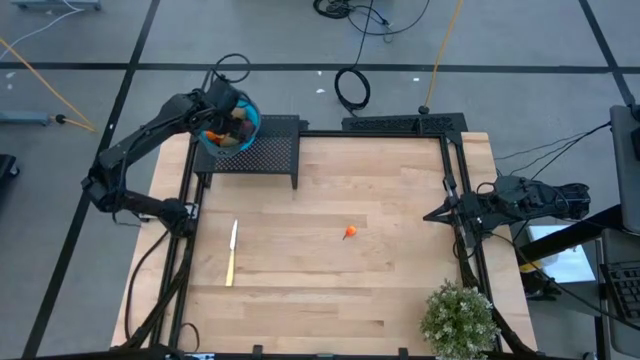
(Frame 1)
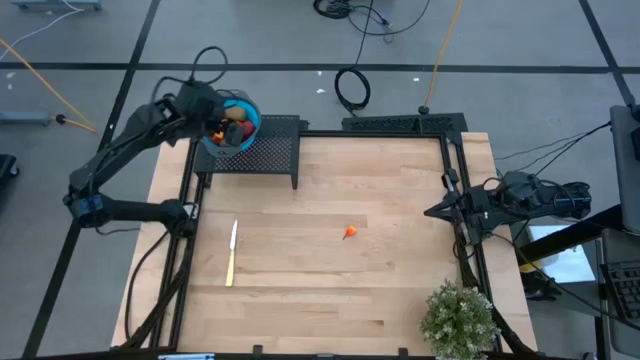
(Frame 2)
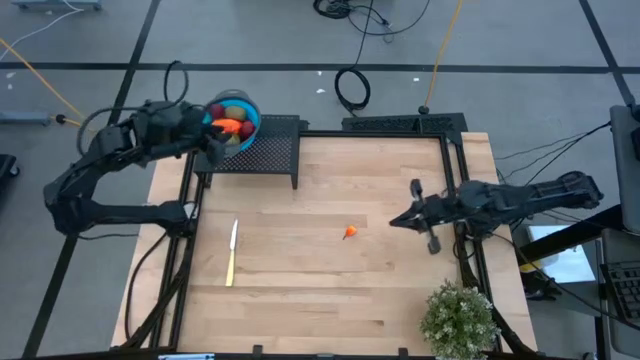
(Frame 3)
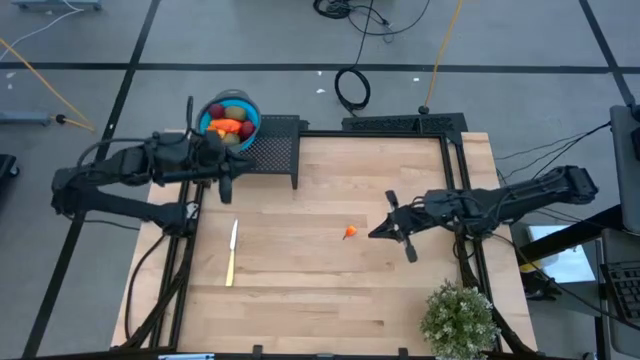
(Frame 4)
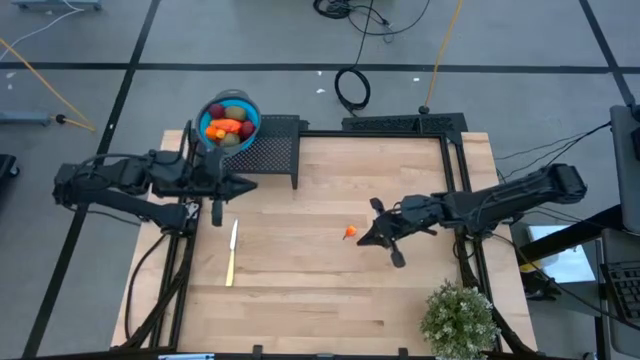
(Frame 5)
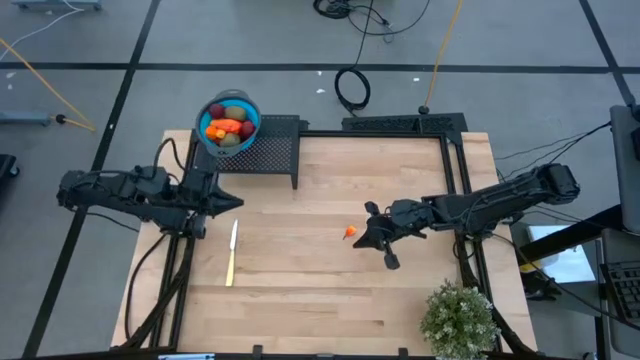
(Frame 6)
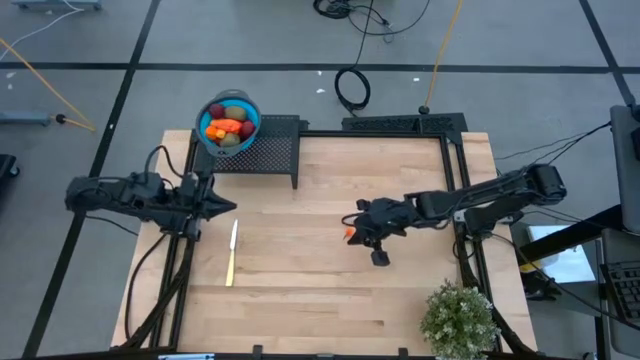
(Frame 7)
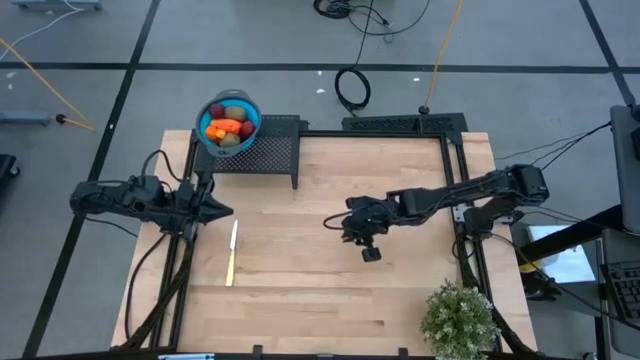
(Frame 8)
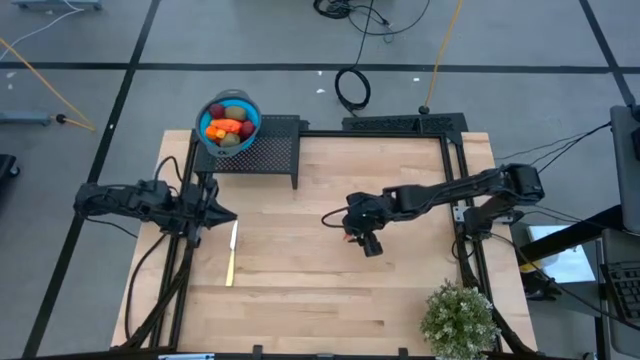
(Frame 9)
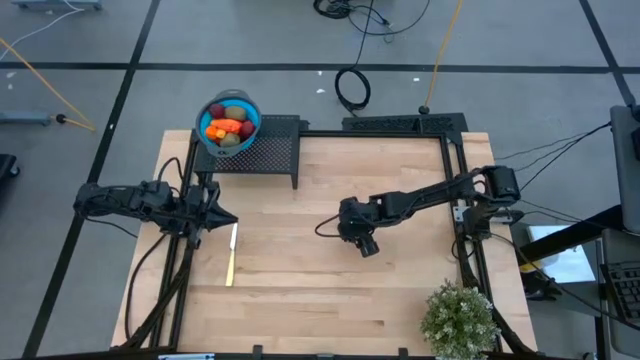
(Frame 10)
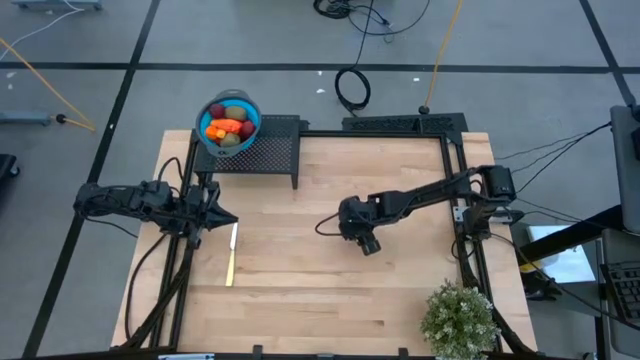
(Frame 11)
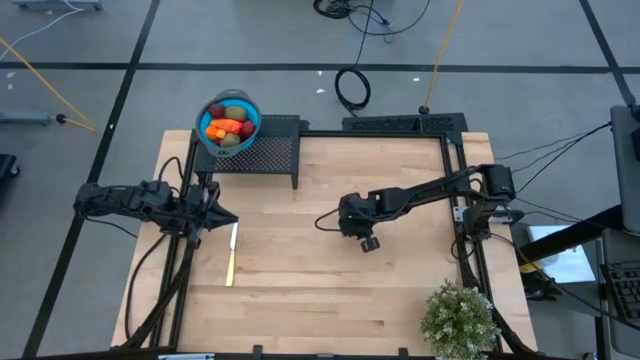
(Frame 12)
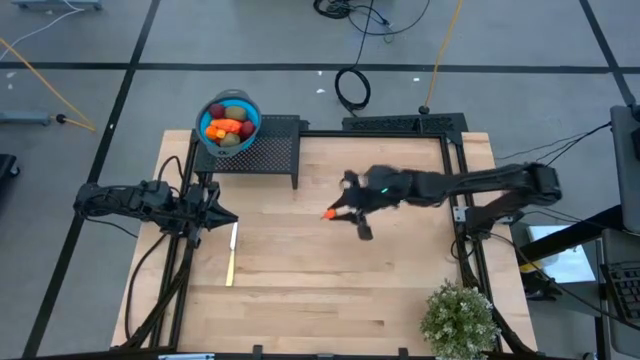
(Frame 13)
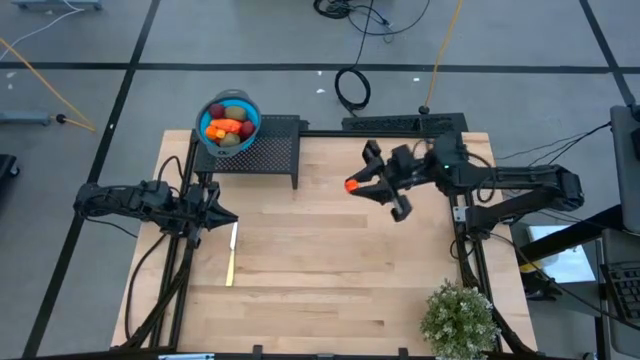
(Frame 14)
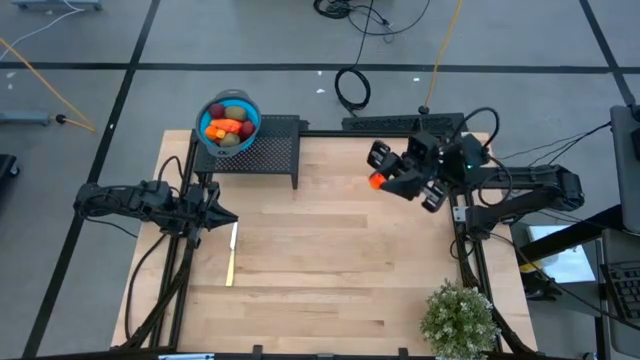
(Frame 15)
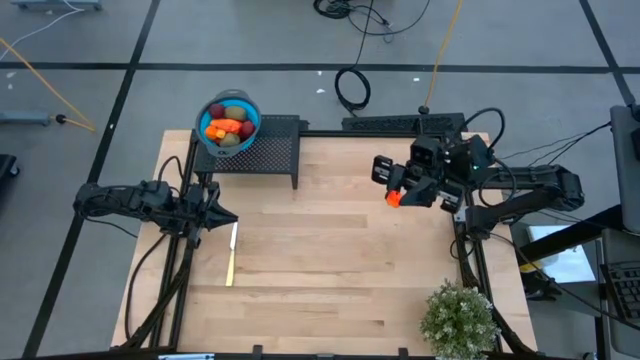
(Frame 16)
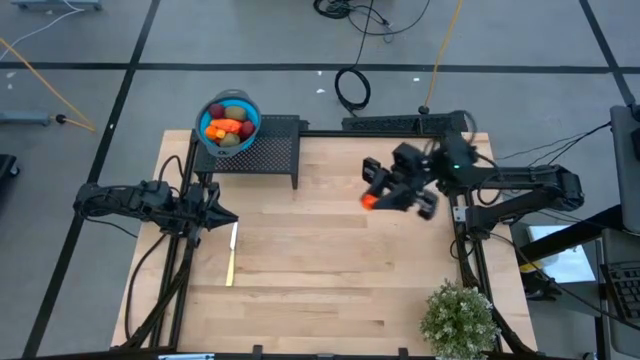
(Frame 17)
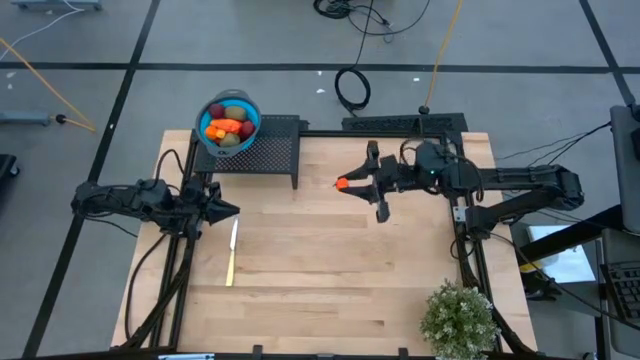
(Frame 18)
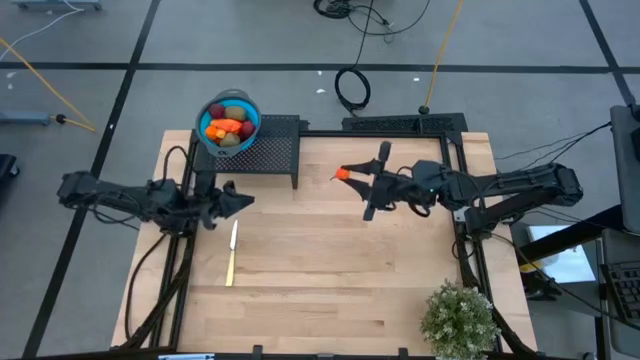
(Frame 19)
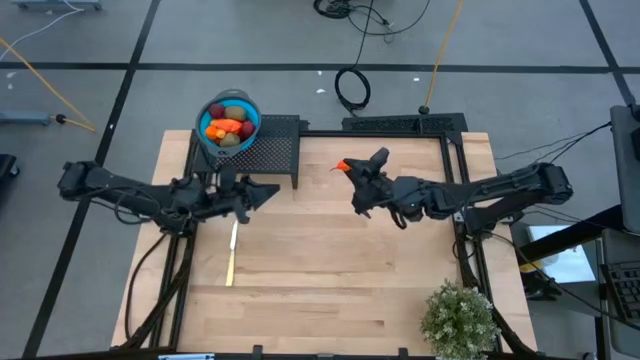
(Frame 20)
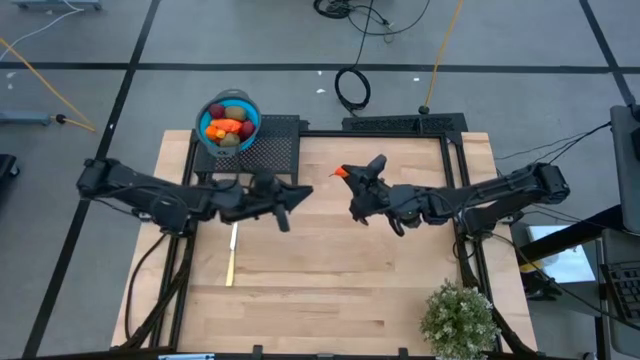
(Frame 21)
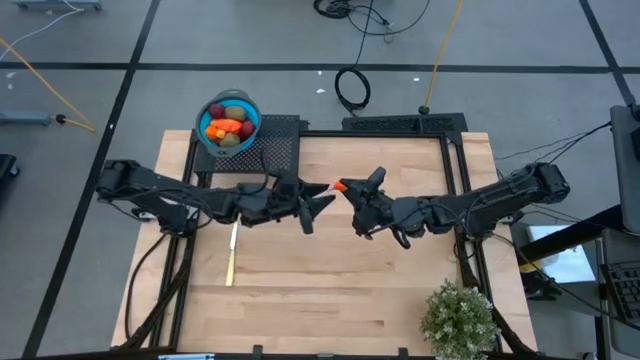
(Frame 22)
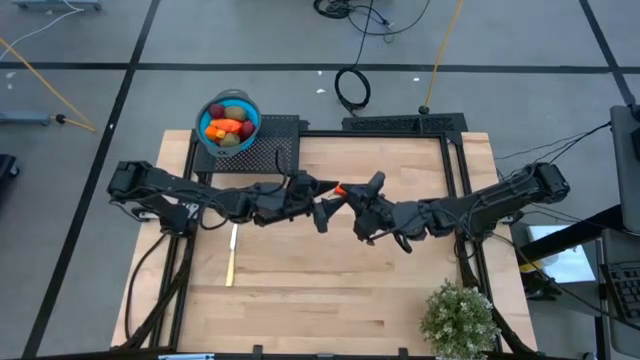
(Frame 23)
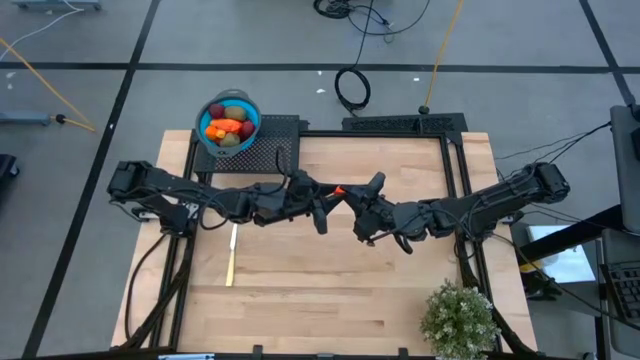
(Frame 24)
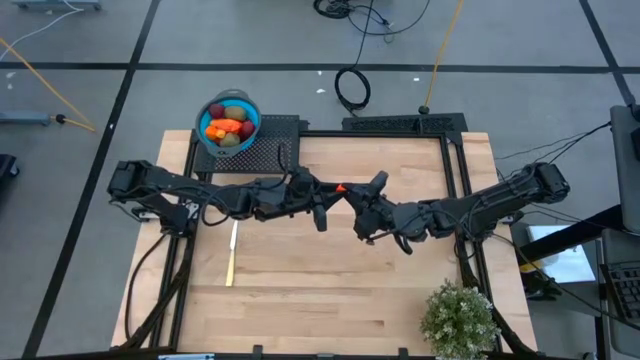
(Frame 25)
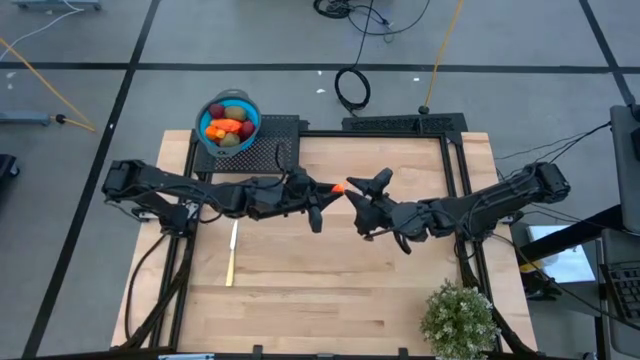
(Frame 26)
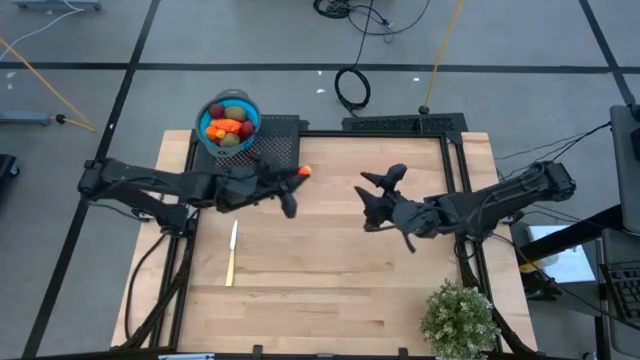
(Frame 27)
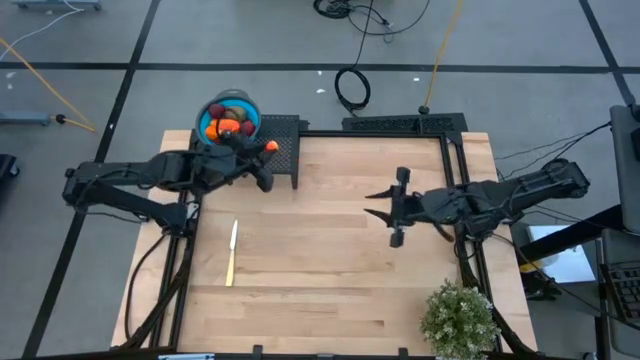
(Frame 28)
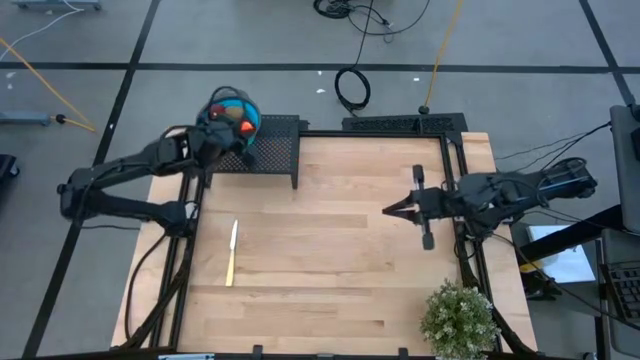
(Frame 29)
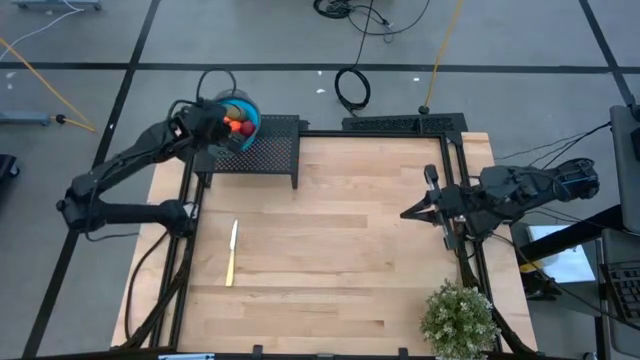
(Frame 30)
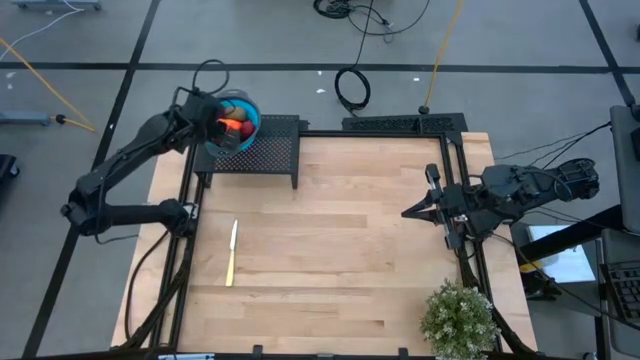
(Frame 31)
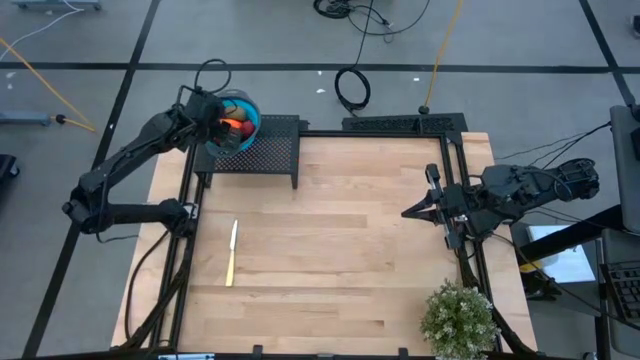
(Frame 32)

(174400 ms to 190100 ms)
Task: Pick & Place Fruit
Put the pear into the blue strainer bowl on the shelf
